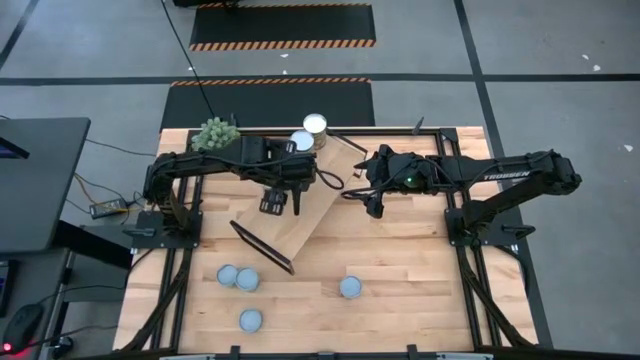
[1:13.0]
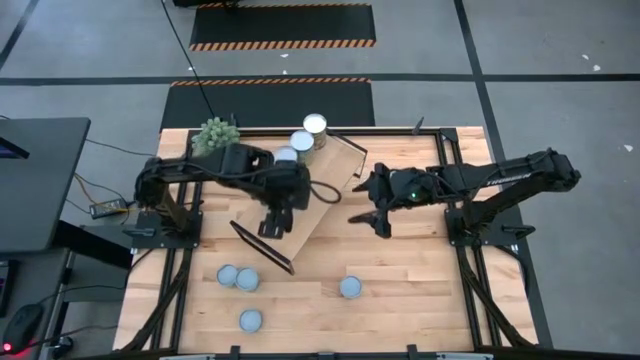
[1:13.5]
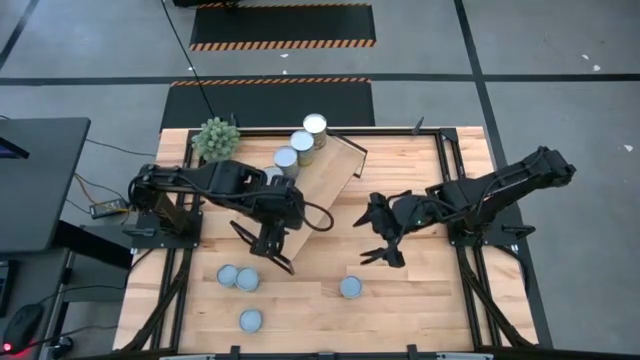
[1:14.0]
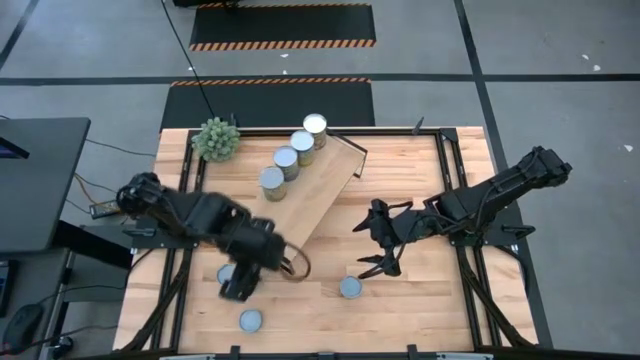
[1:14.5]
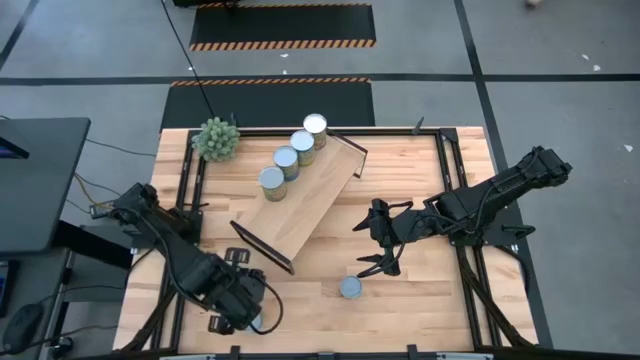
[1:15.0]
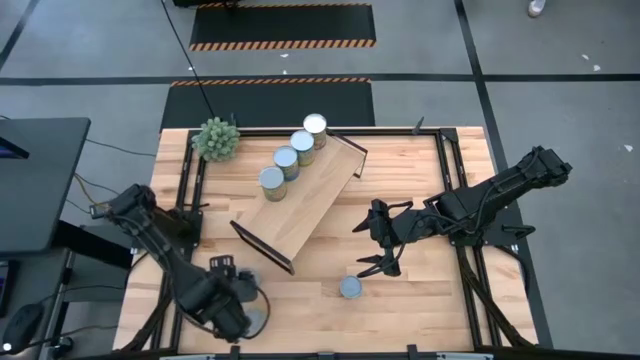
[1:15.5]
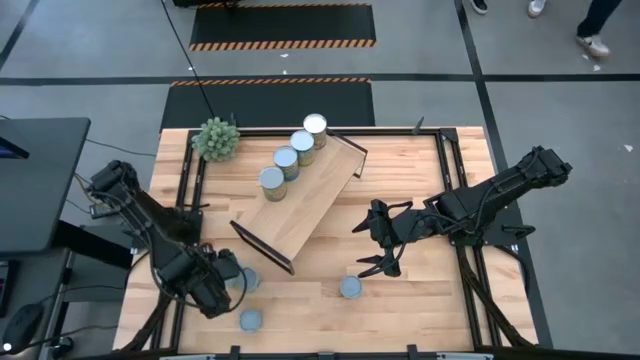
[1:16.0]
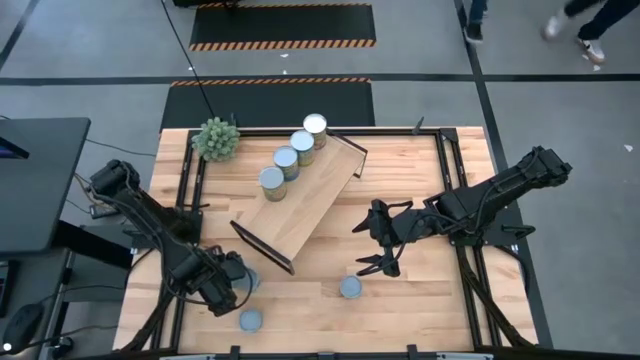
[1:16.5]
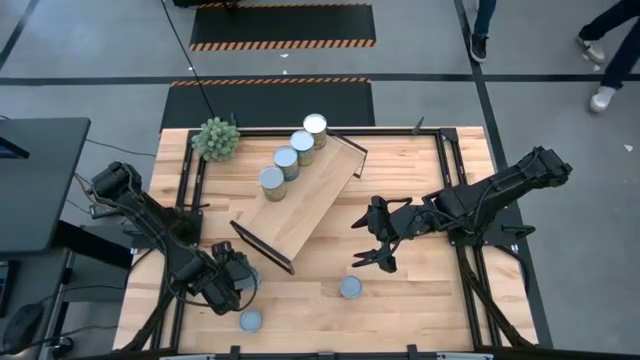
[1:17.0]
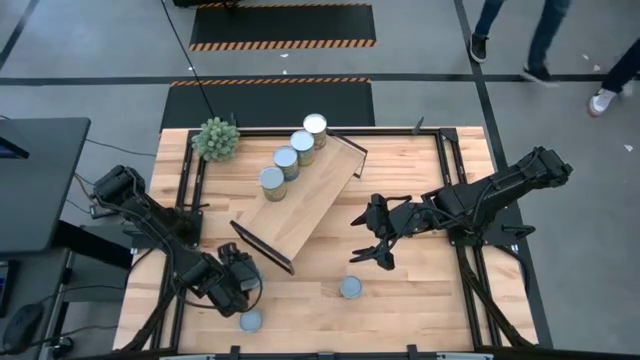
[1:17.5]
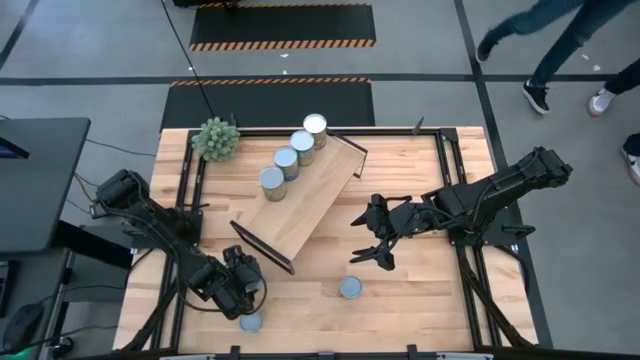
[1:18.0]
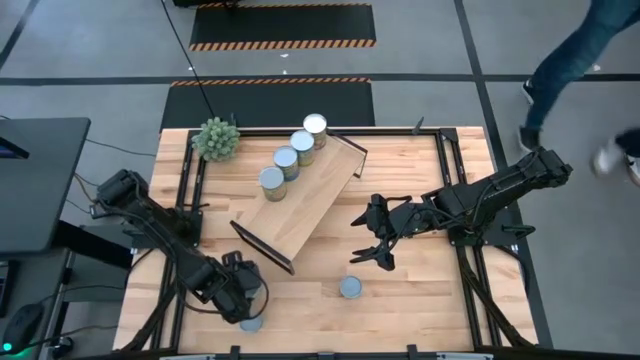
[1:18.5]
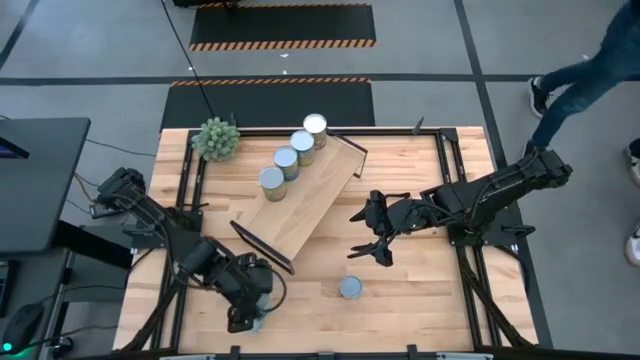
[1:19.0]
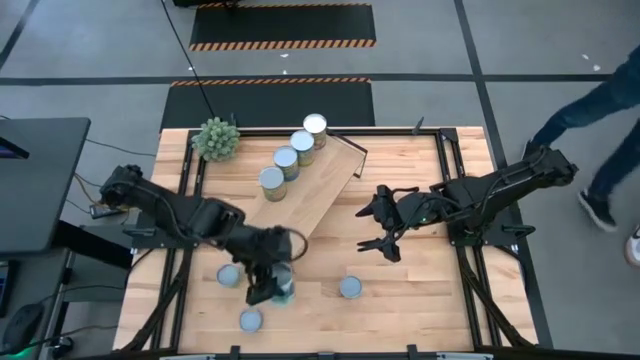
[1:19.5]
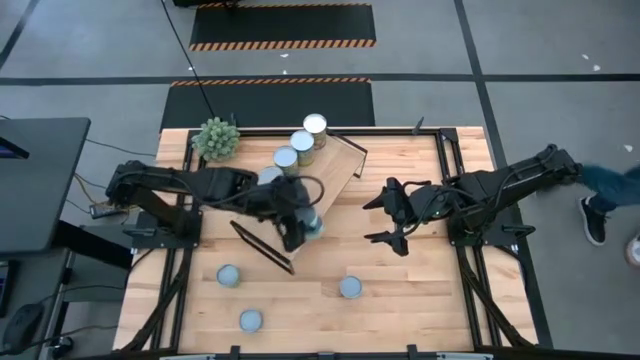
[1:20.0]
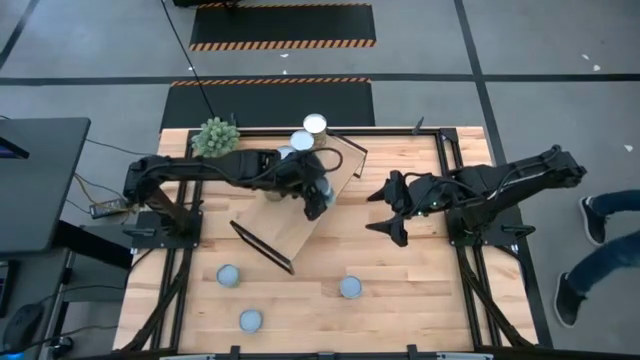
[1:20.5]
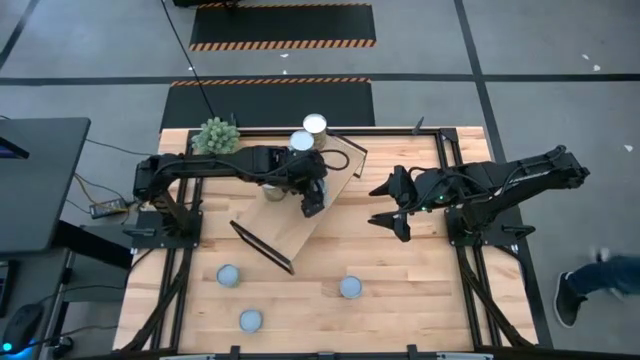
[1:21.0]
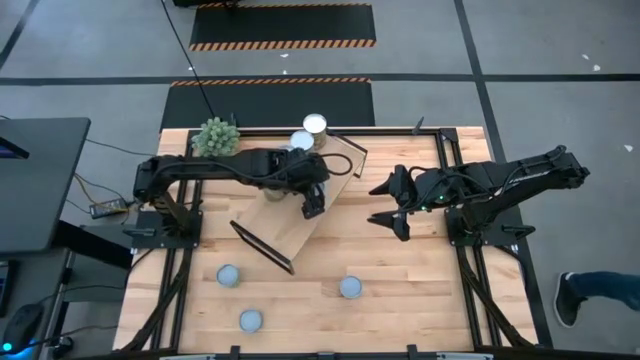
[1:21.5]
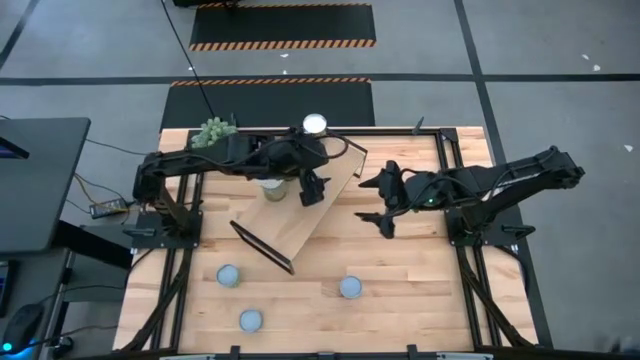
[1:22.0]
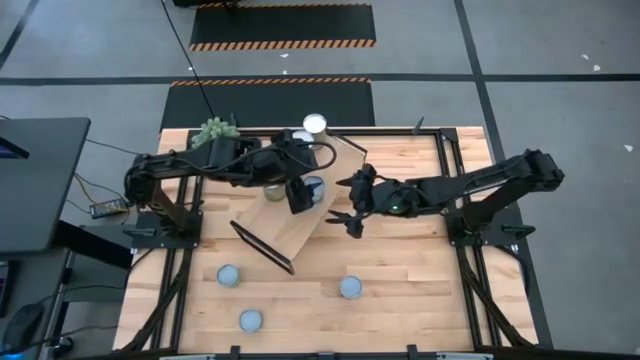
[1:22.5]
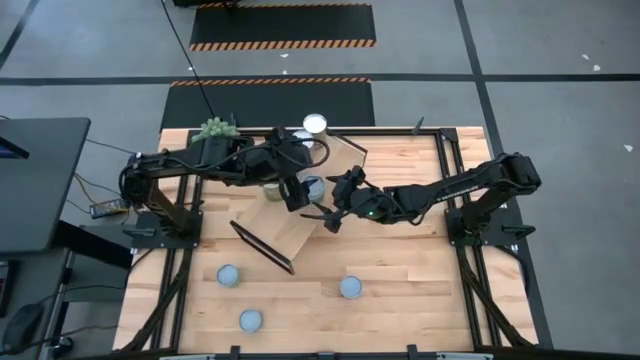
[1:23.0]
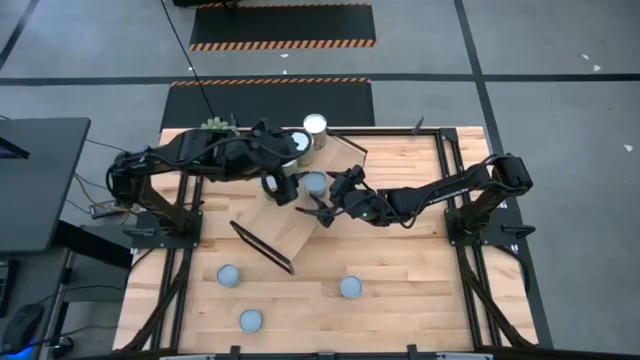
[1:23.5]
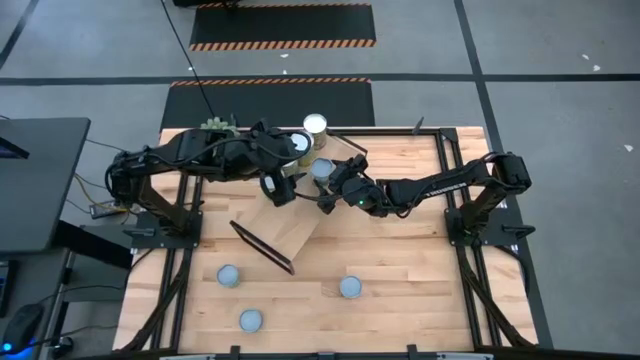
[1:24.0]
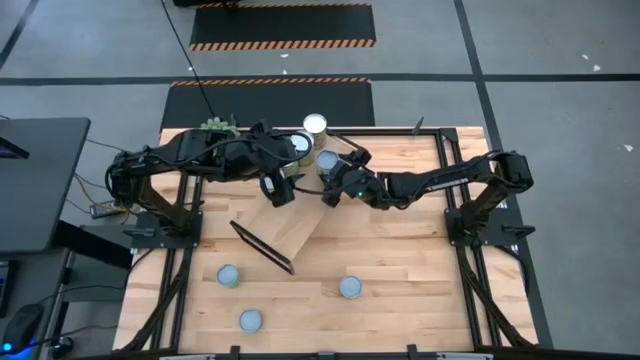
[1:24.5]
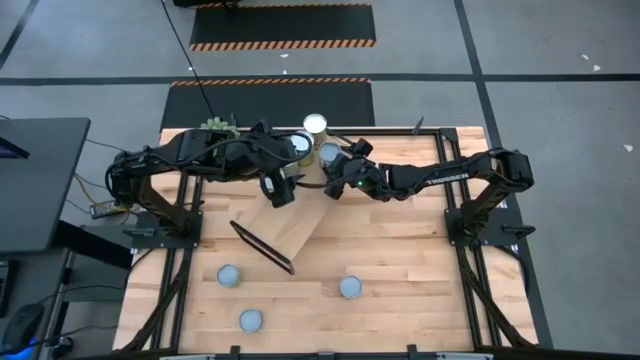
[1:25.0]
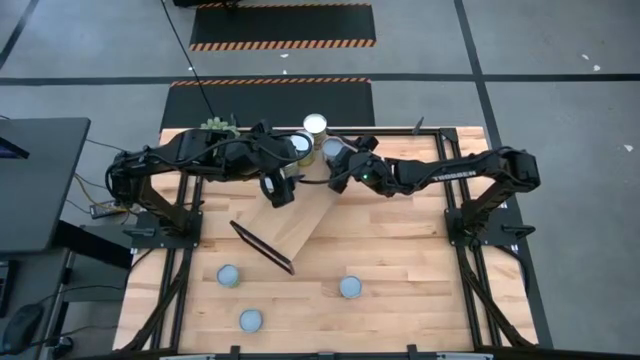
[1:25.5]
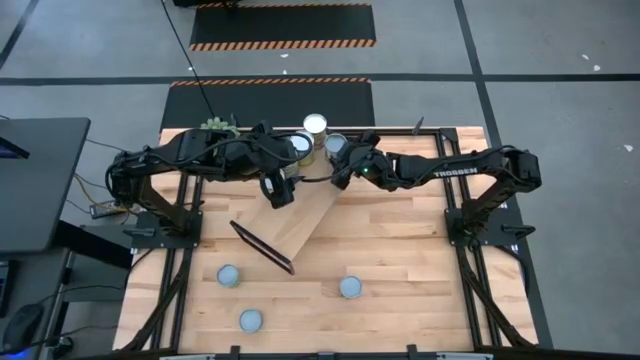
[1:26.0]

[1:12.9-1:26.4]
Task: Pick and place cans onto a shelf
Put the canned mix vegetables on the shelf

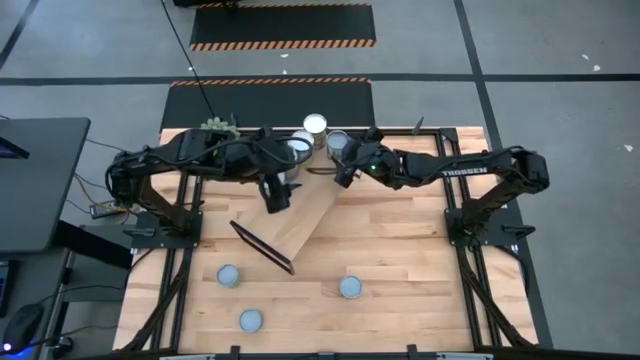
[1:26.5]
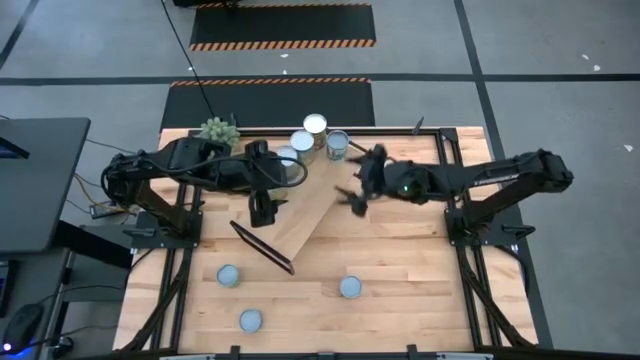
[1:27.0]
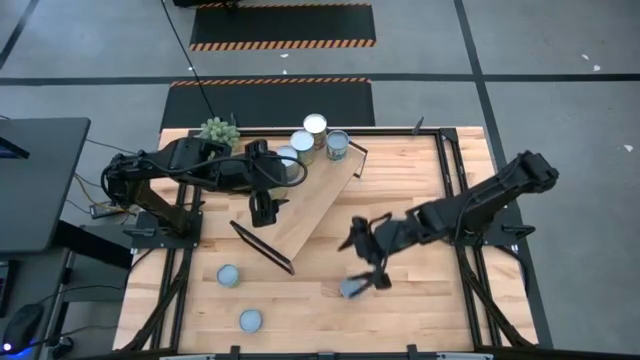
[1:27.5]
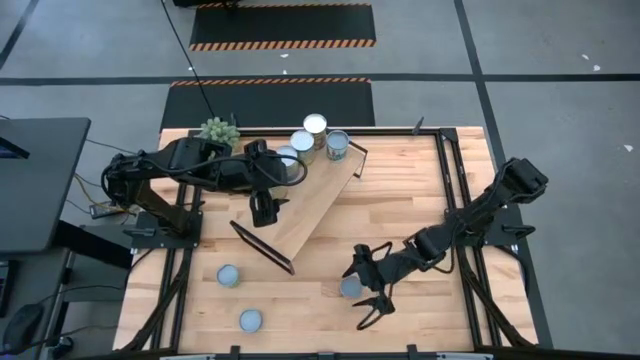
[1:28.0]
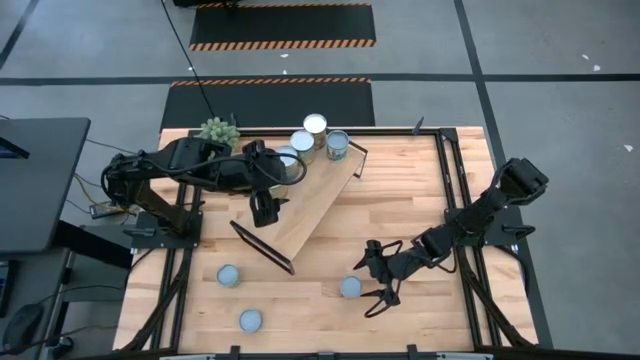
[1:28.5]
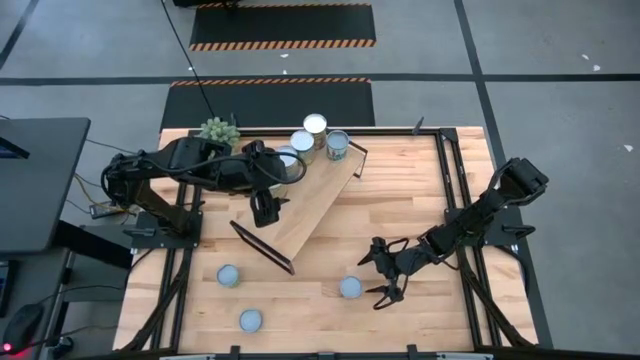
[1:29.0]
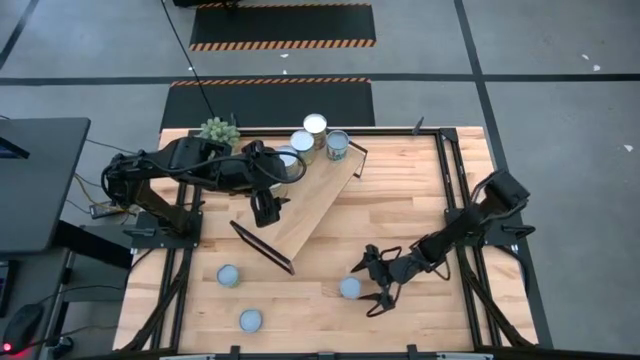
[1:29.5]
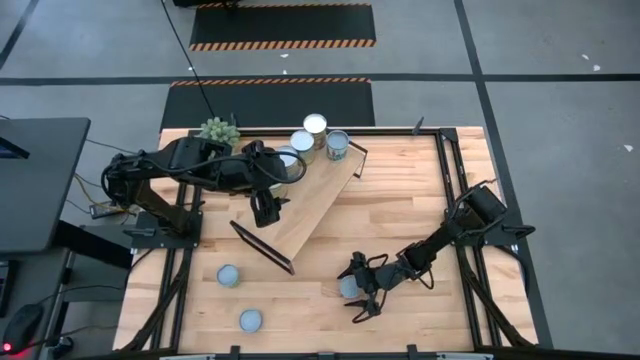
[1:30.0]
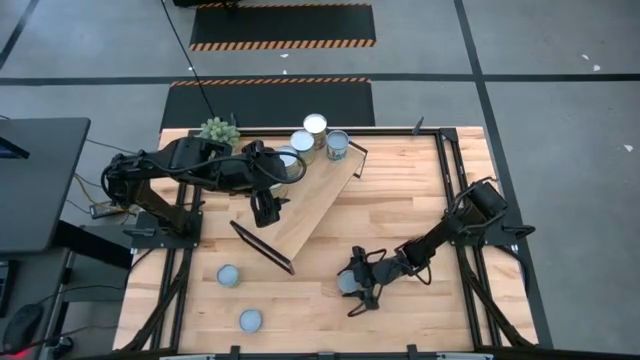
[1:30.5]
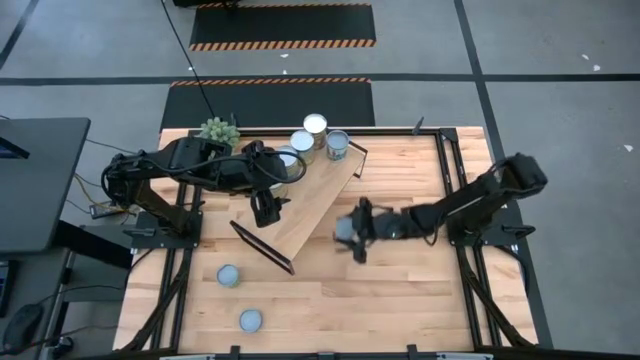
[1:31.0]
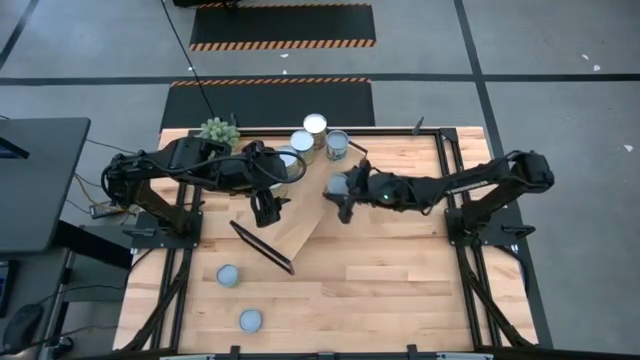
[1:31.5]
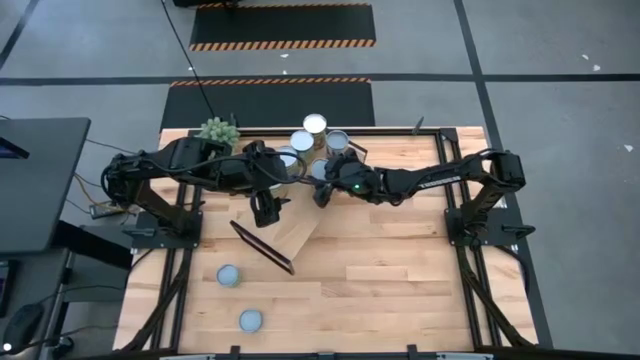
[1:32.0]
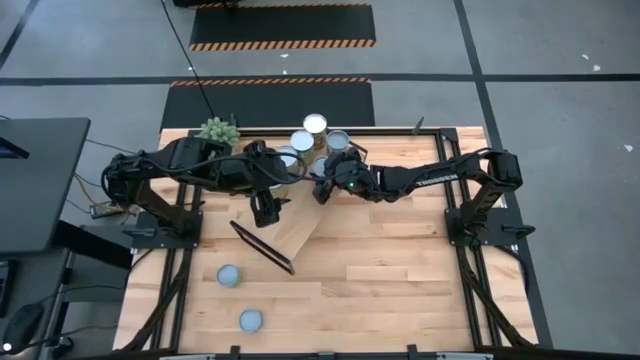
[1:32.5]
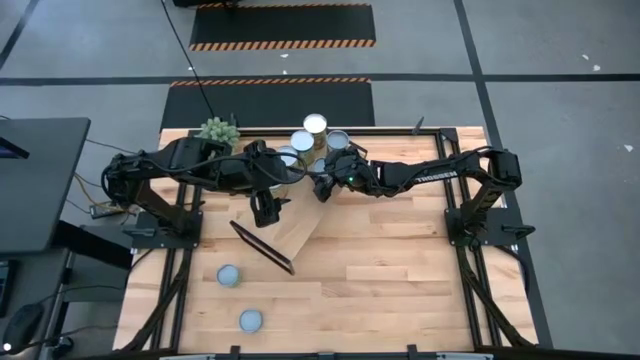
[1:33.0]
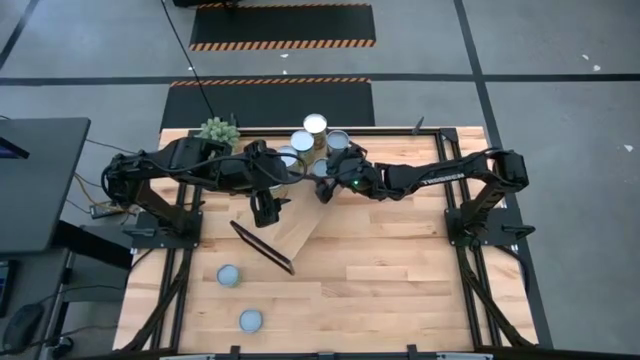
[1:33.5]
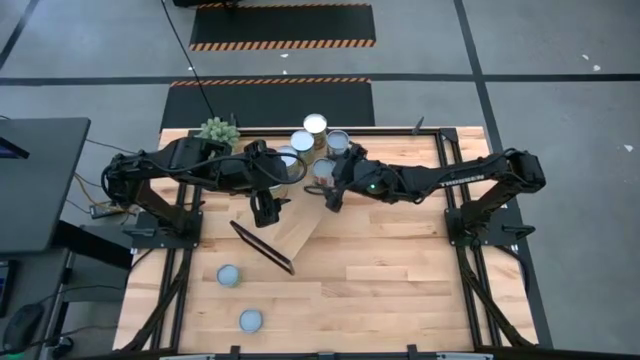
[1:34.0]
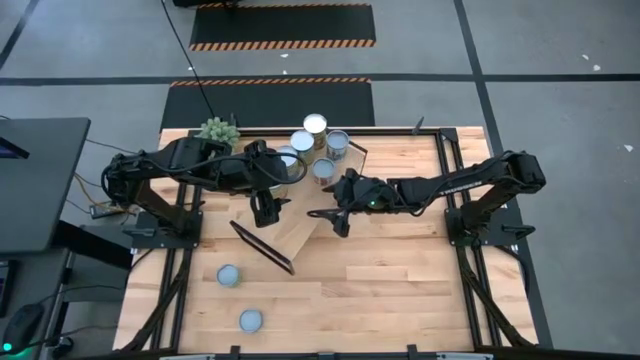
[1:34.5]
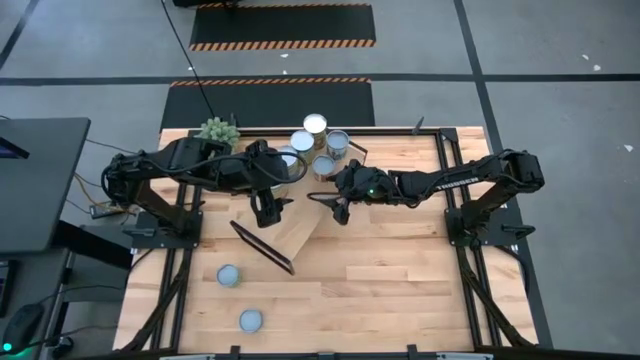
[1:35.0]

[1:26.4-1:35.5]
Put the canned tomatoes on the shelf
